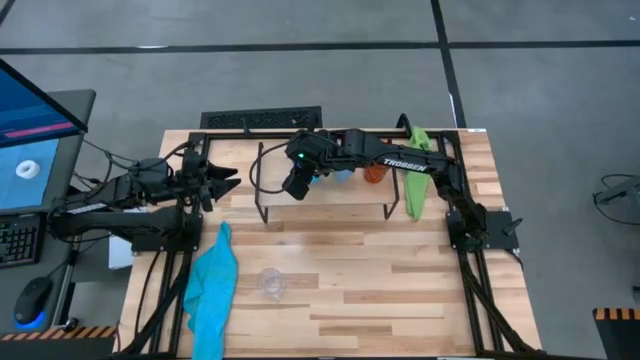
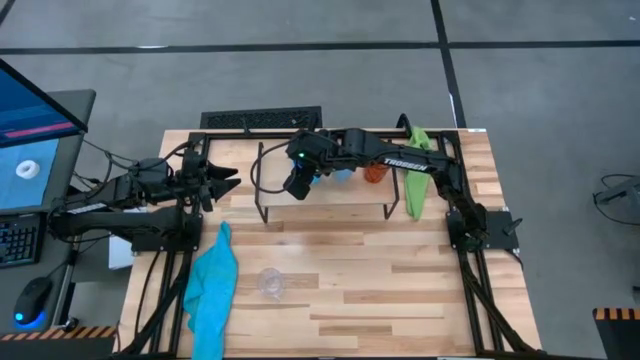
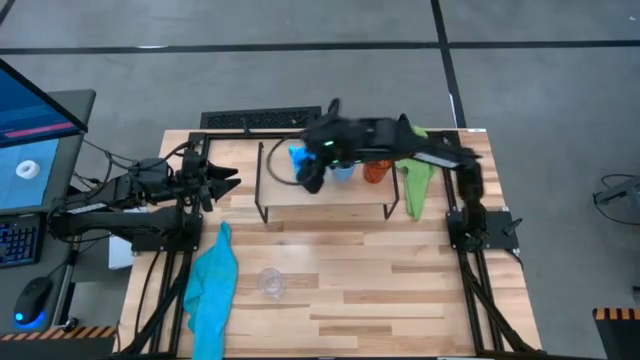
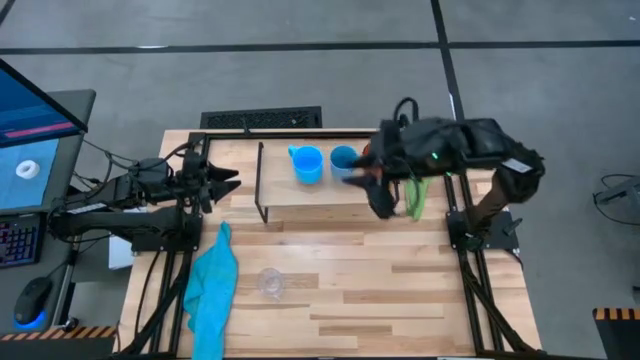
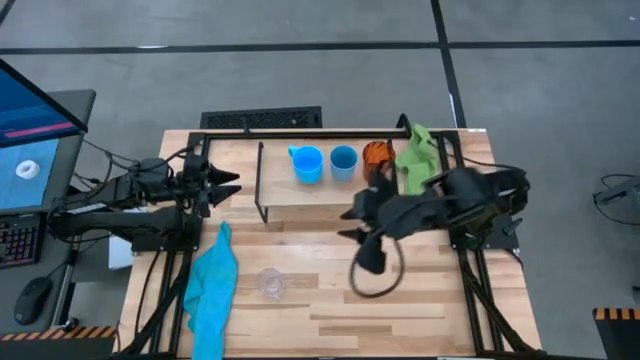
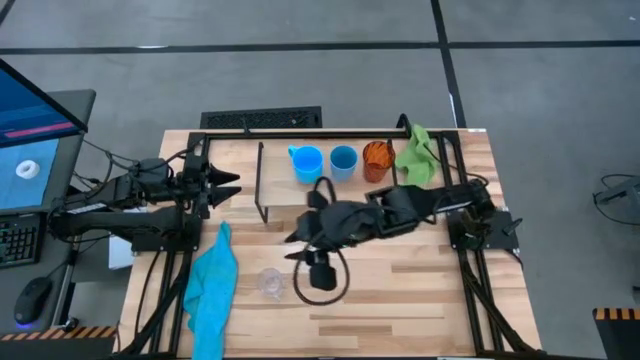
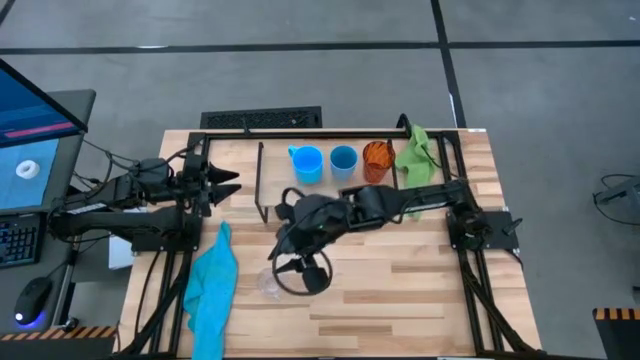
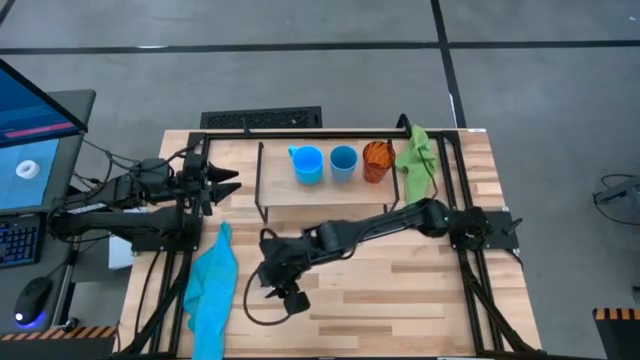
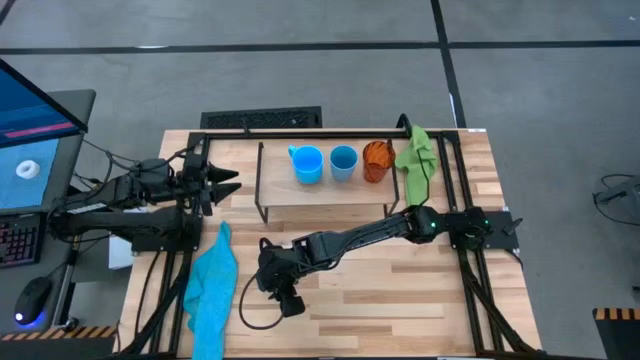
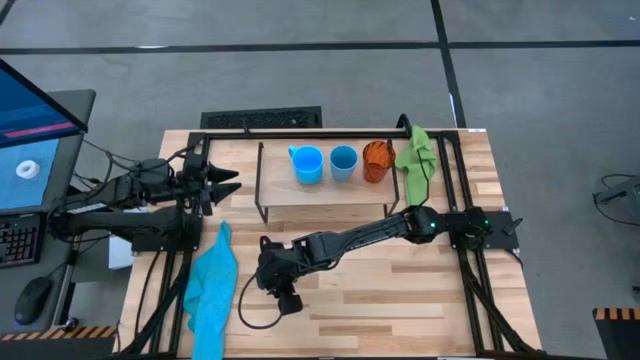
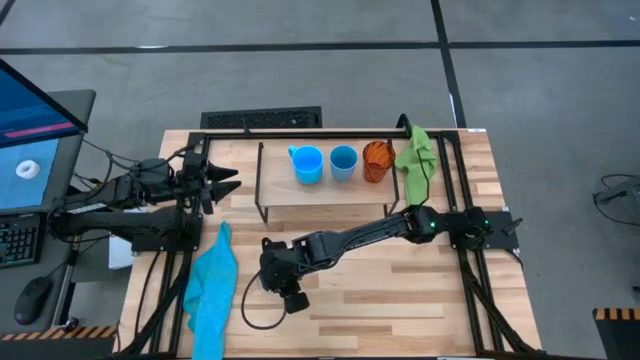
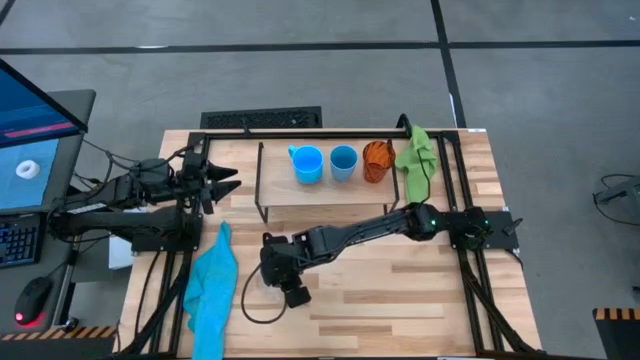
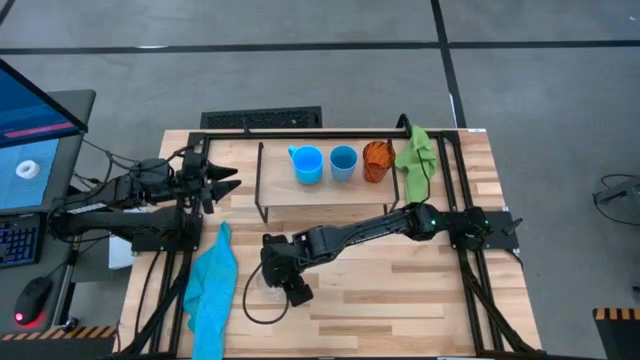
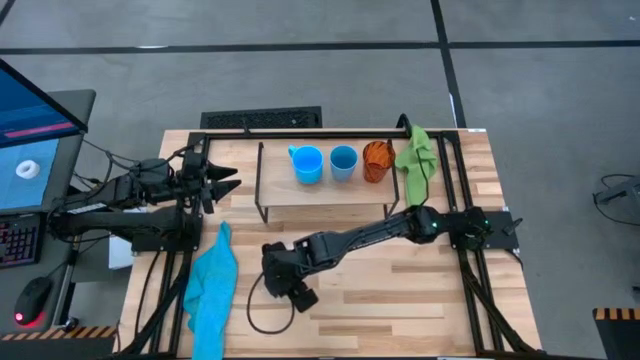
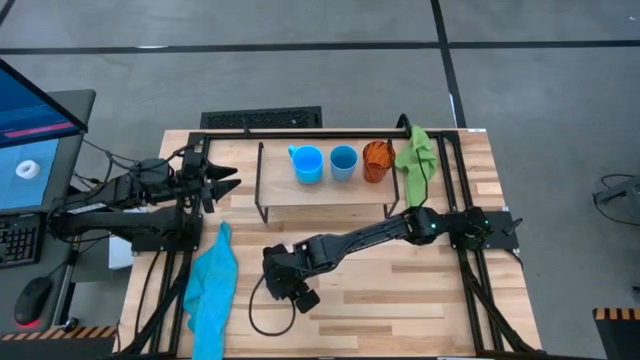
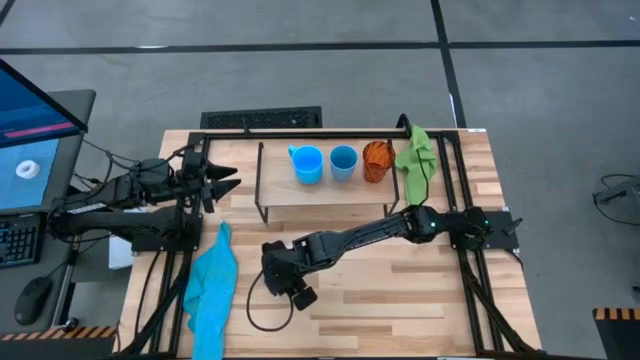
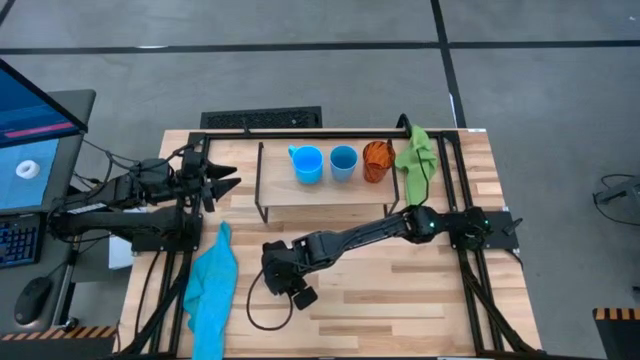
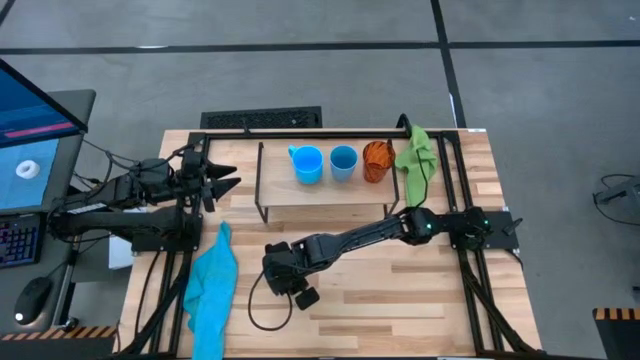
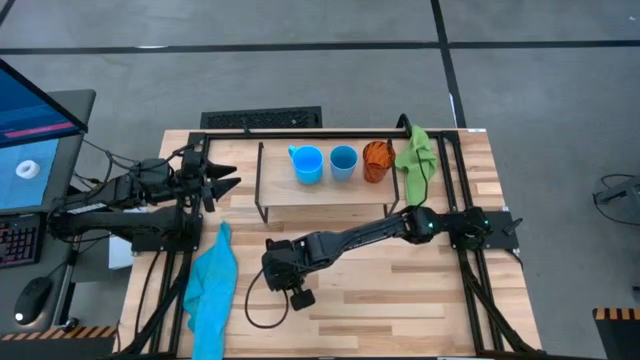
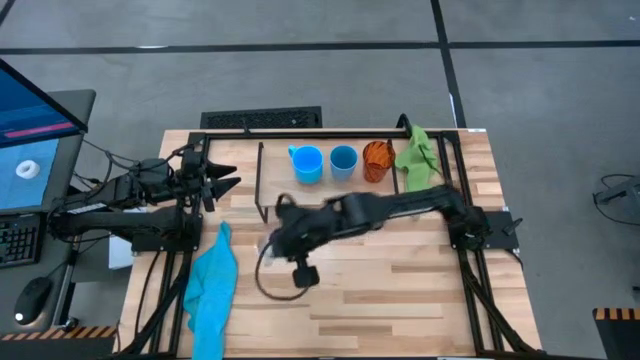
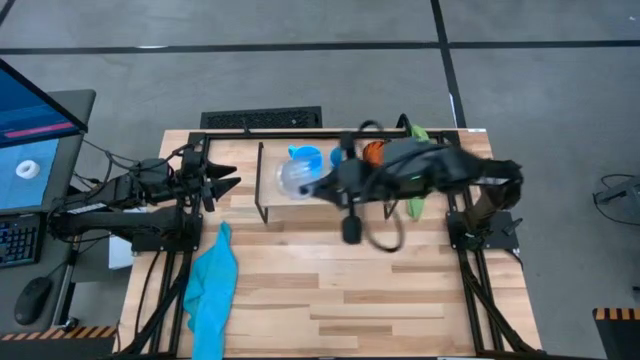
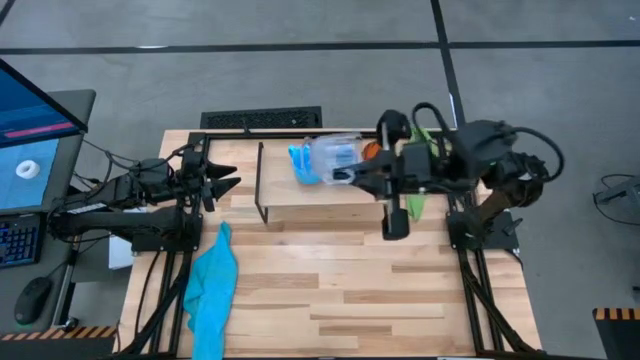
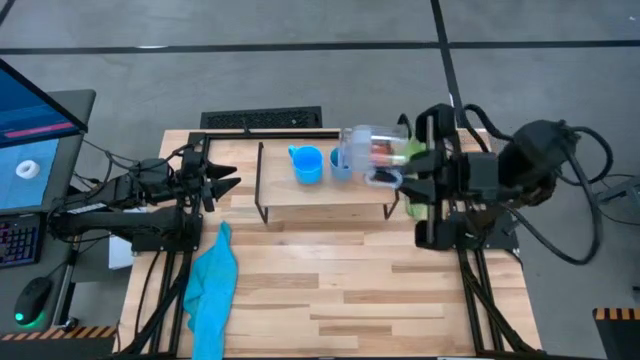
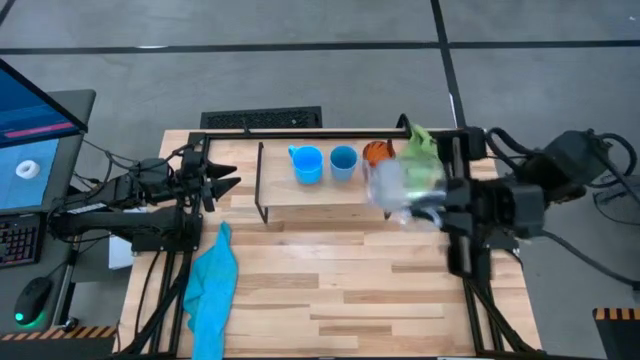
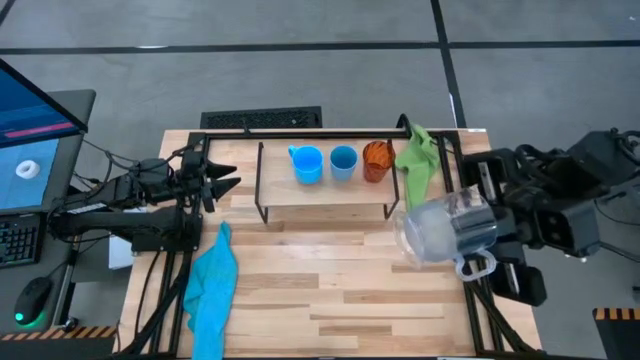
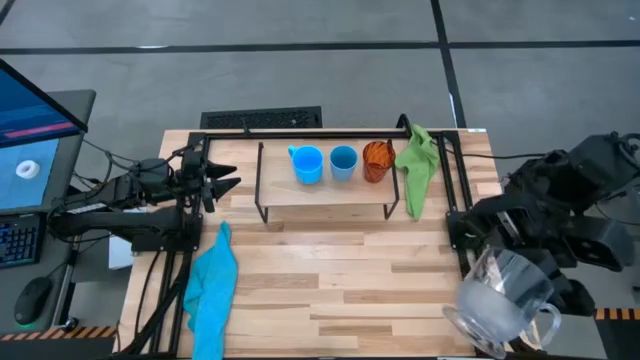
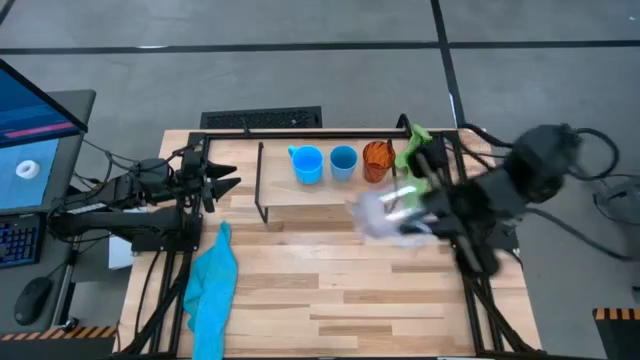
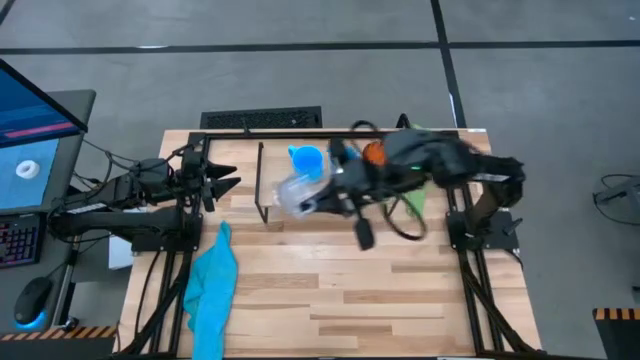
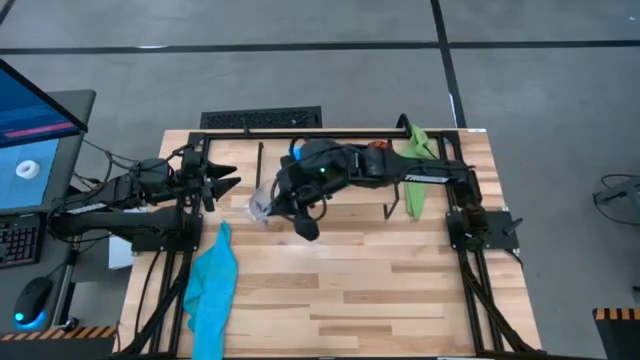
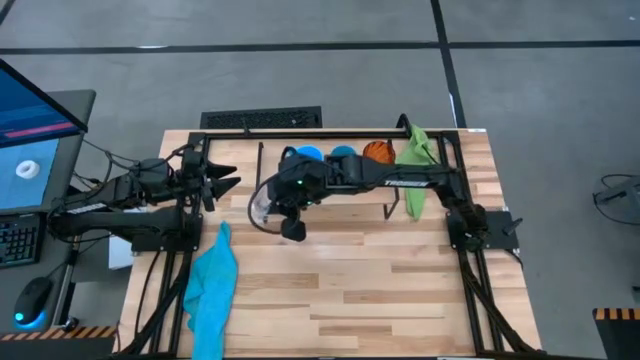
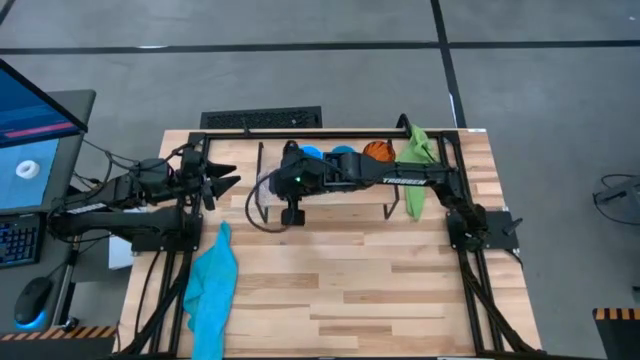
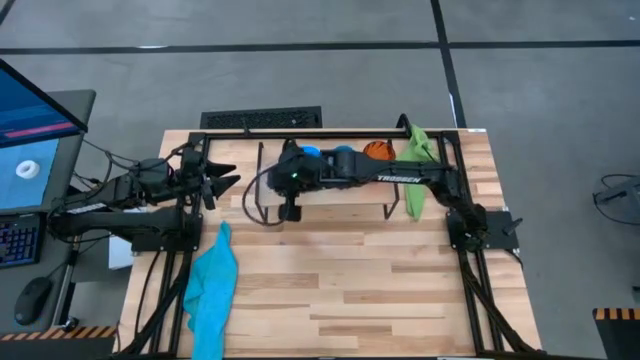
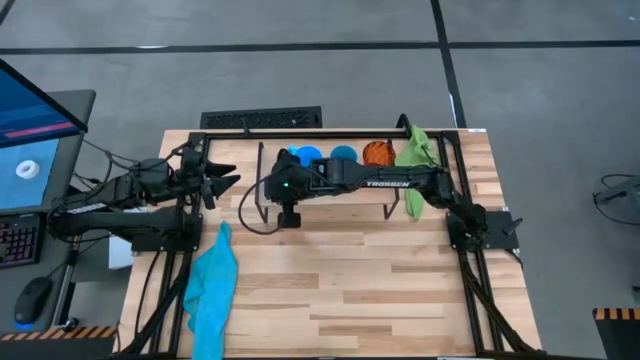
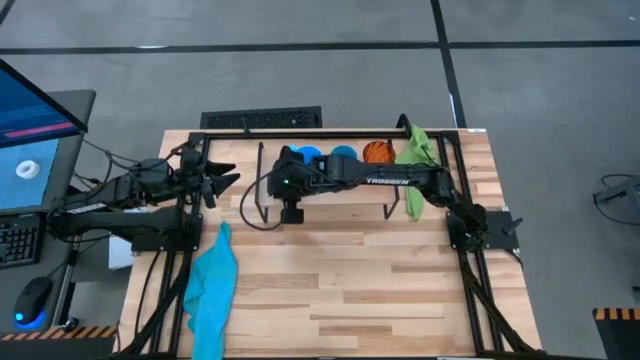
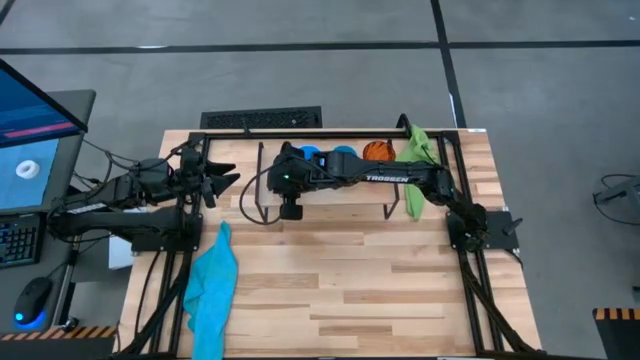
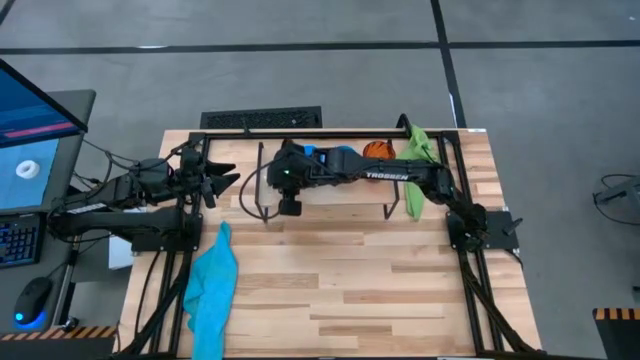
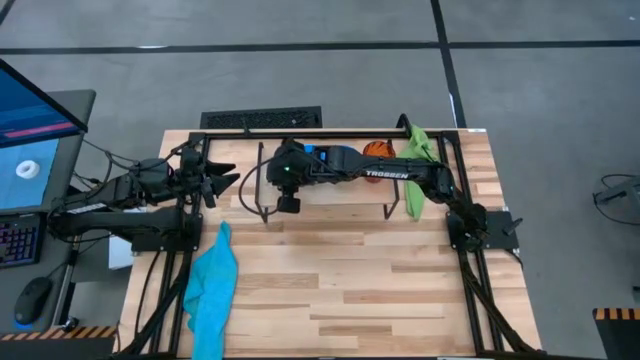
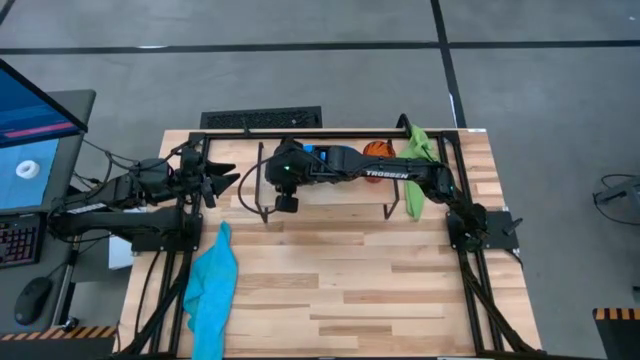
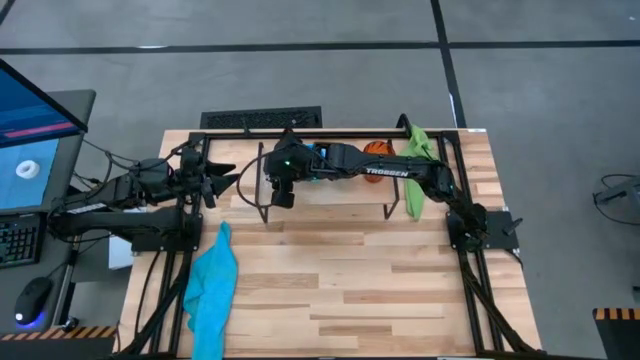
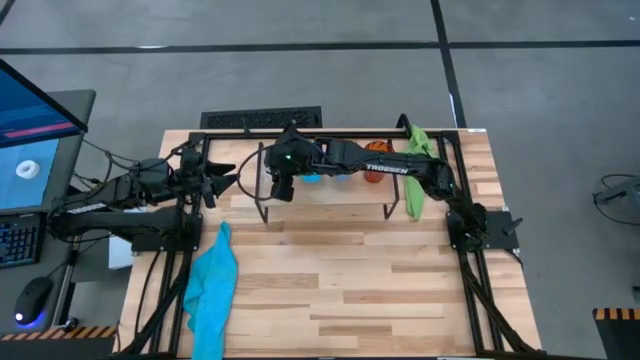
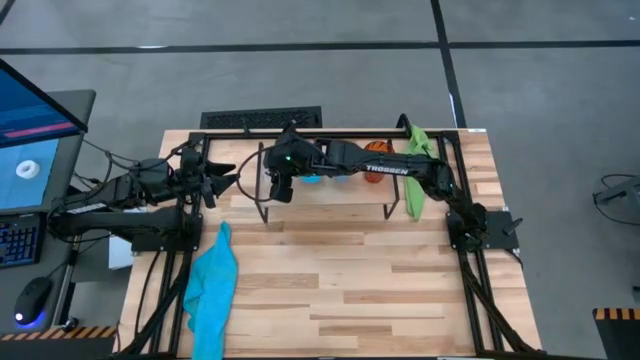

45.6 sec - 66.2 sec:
Task: Stack small to large cups/mugs on shelf
Put the transparent mug on the shelf
